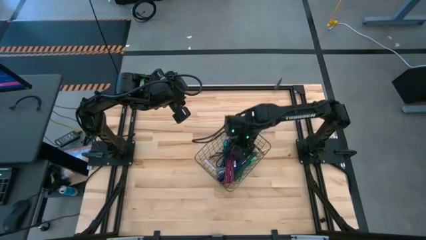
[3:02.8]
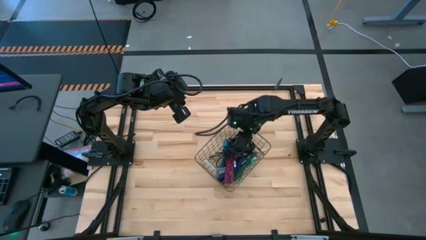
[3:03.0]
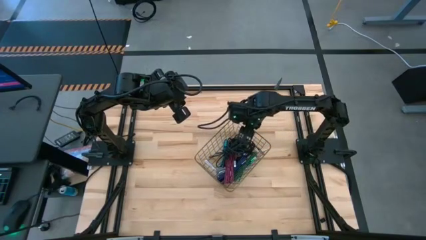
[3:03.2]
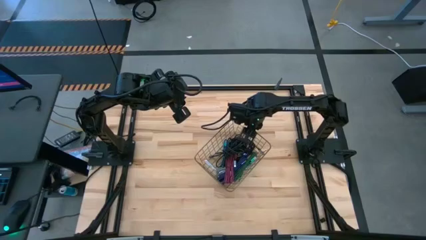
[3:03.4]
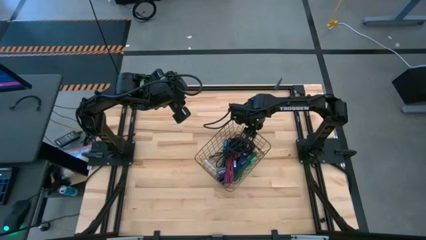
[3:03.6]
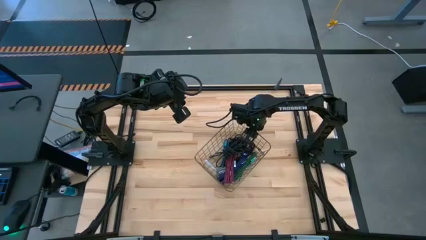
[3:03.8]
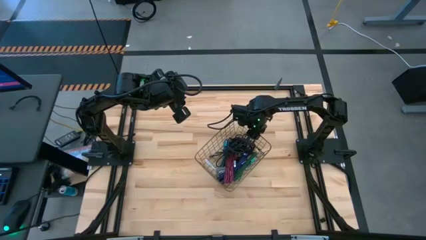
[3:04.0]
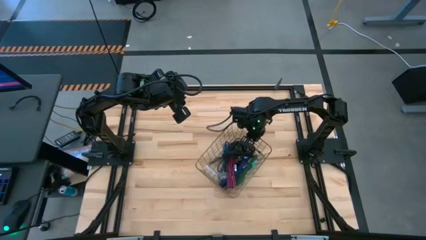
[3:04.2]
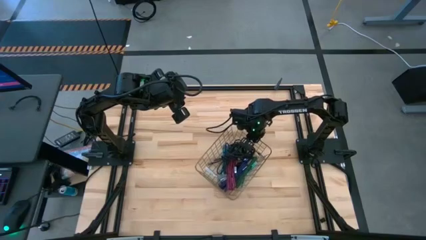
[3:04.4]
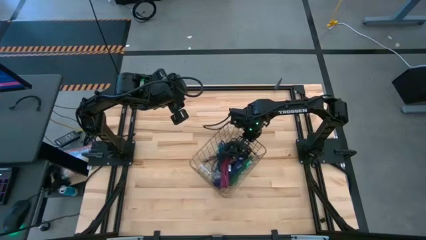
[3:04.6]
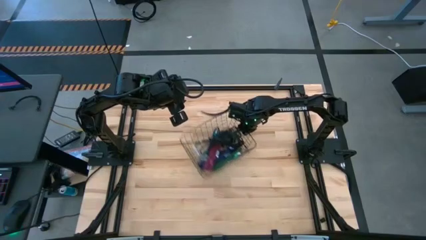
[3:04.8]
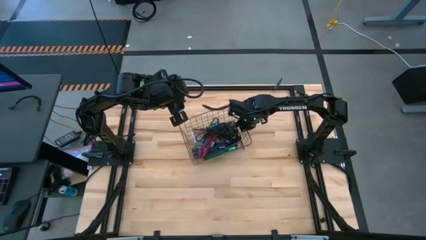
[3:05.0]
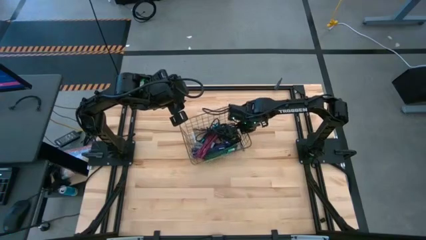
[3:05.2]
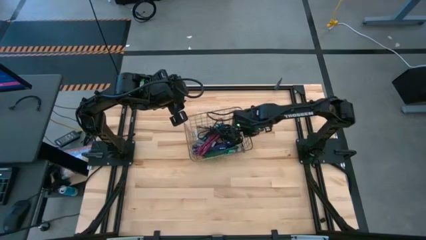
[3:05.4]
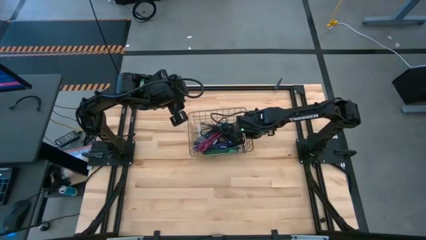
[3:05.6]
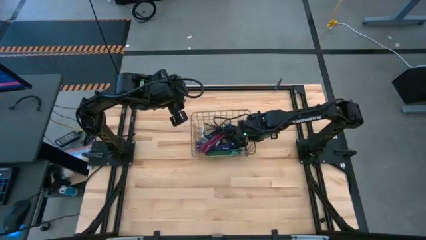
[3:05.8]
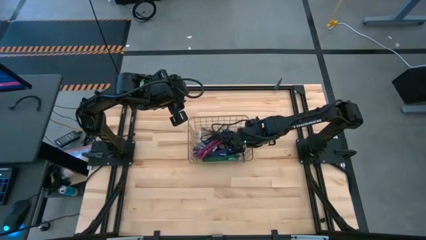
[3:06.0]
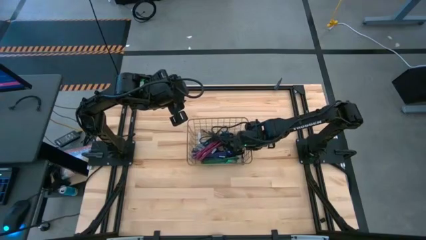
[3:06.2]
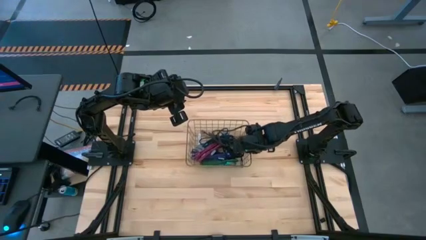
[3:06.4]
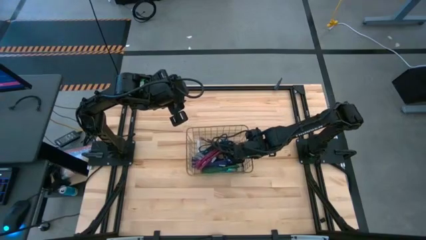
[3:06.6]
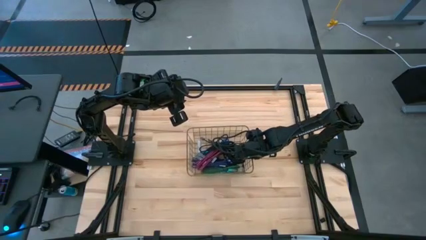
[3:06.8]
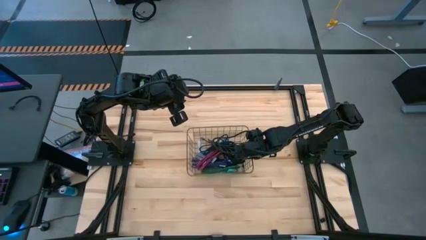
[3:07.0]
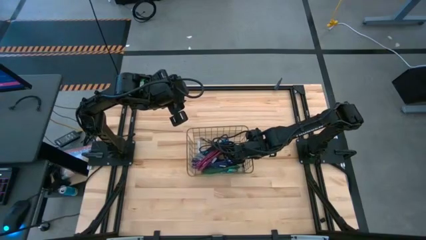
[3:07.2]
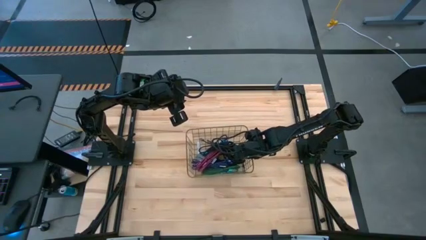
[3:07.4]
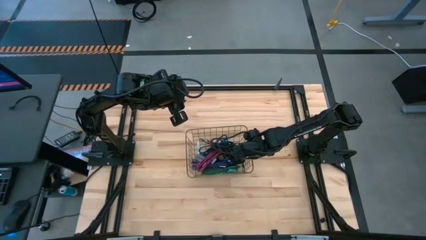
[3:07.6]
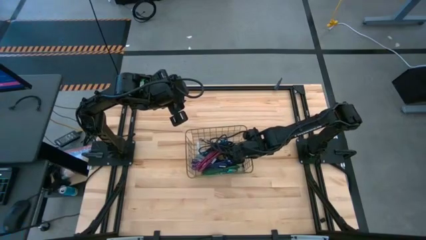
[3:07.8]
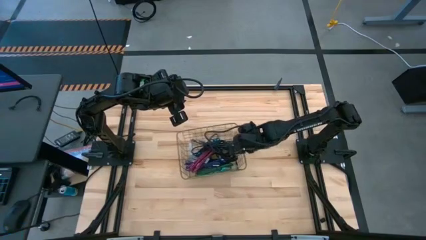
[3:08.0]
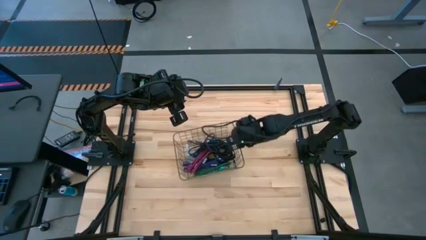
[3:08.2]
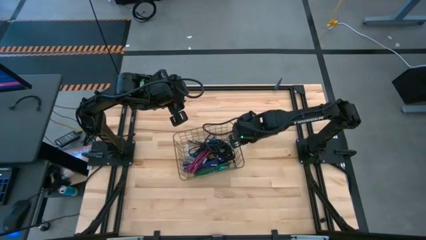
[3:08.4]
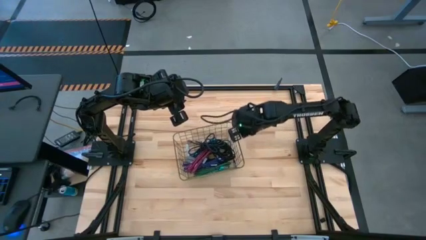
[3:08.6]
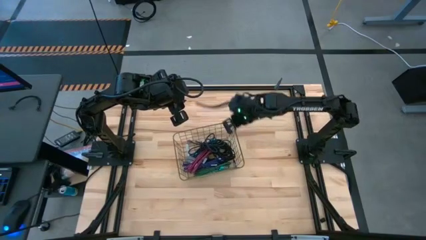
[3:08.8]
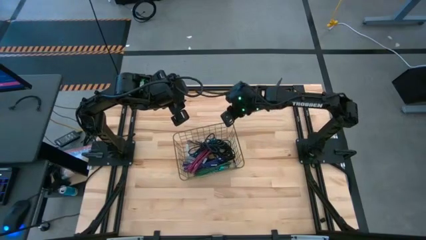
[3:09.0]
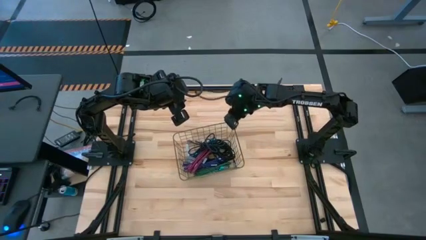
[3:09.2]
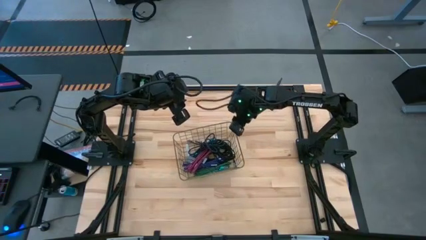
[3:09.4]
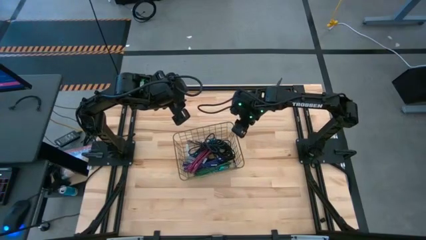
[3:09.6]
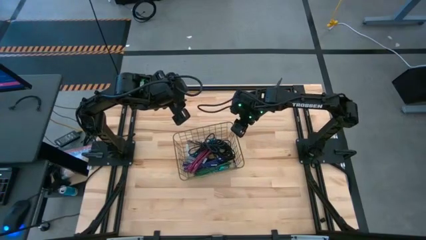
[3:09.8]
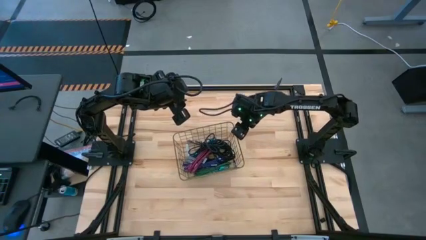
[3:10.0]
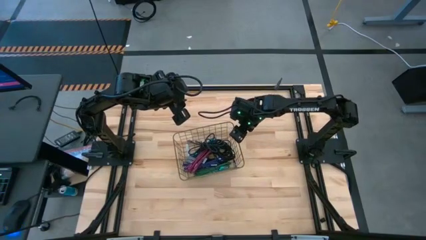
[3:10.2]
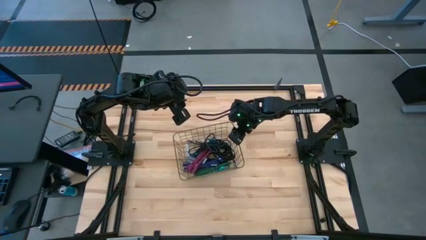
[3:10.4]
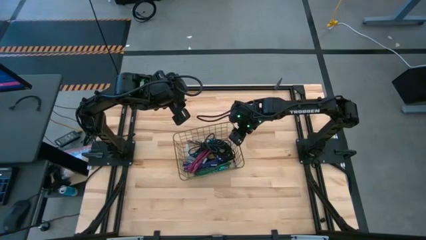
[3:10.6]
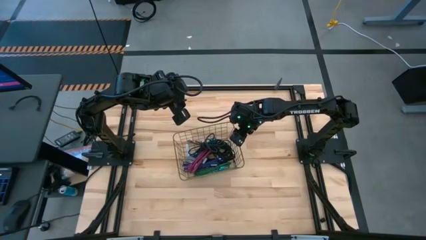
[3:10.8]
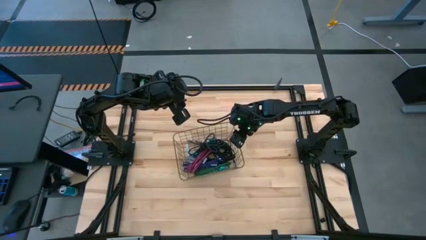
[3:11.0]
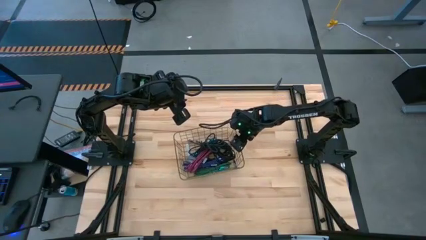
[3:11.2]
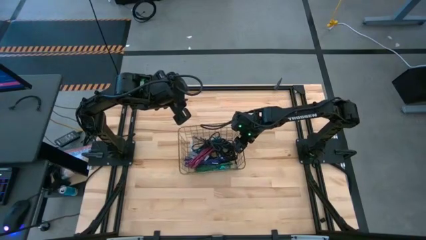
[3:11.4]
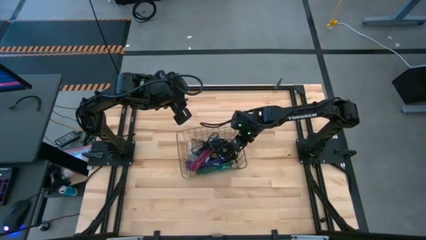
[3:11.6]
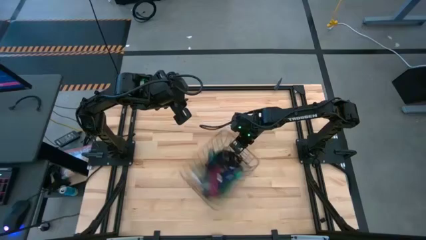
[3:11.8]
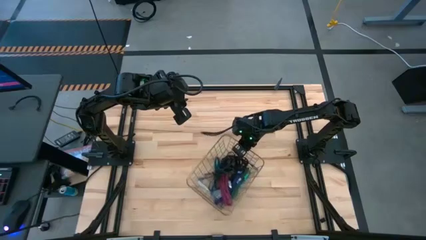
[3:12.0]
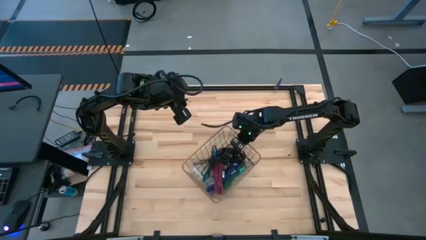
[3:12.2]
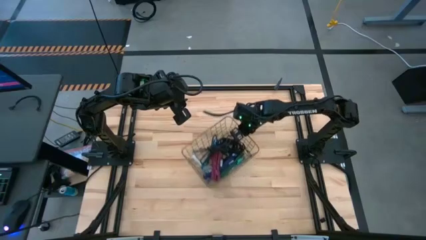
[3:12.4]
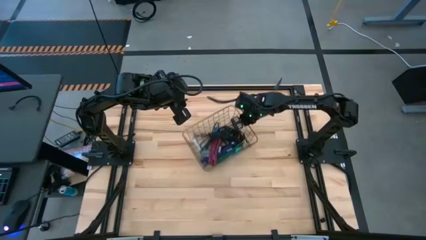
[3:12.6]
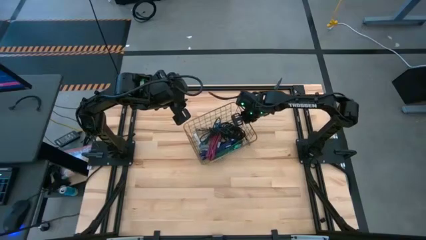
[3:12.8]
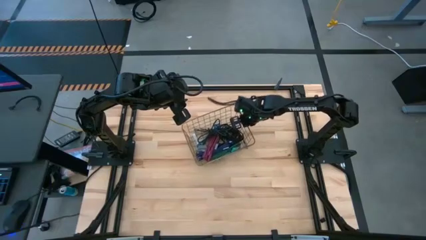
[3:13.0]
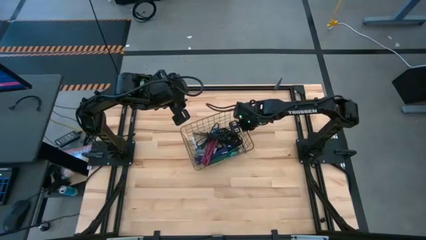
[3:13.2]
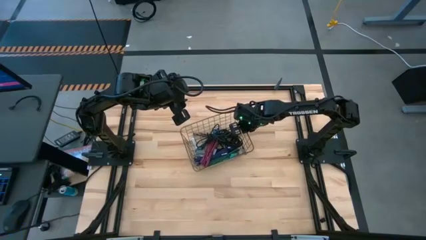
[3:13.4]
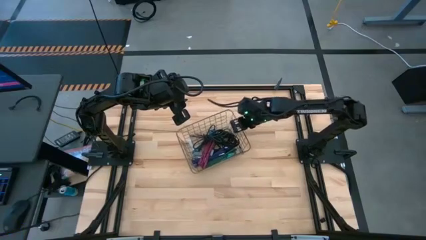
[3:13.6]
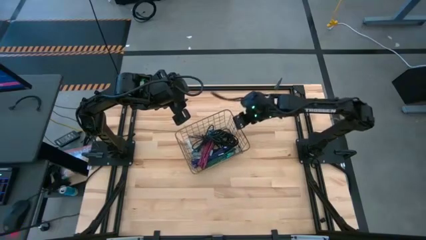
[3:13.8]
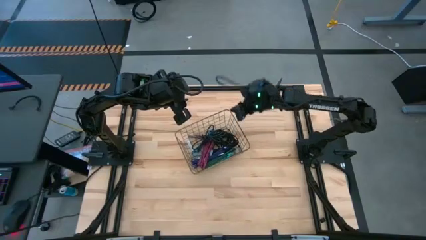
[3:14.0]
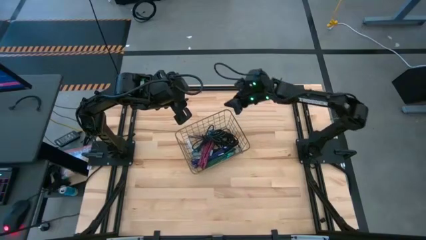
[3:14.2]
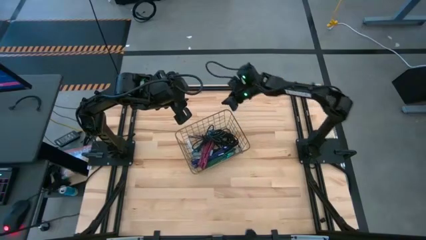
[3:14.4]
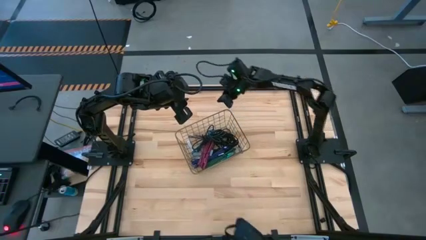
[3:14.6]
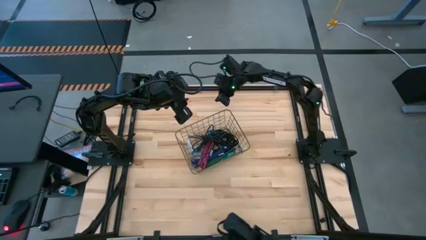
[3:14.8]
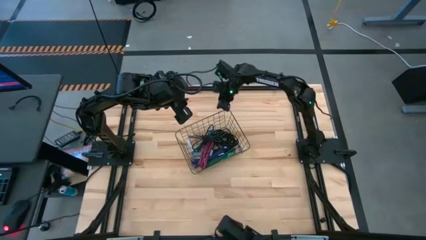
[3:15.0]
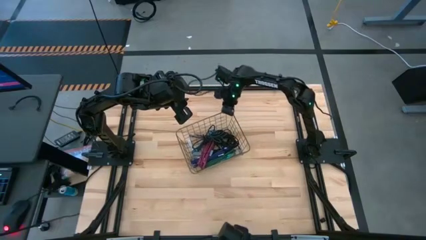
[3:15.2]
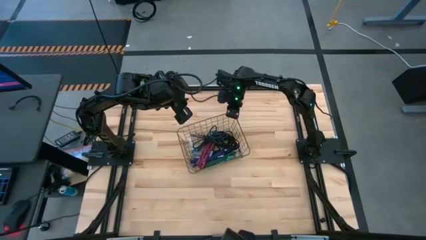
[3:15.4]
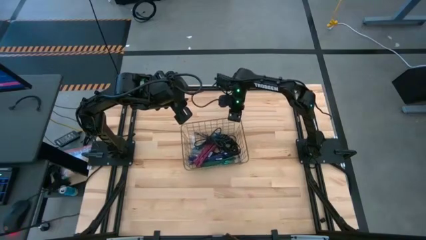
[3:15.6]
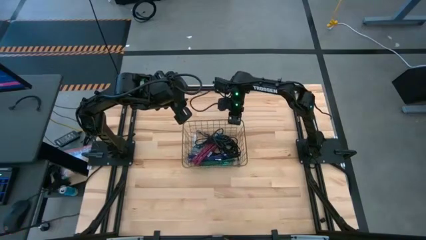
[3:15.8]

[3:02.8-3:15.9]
Task: Pick and place USB-C Cables
Adjust the wire basket

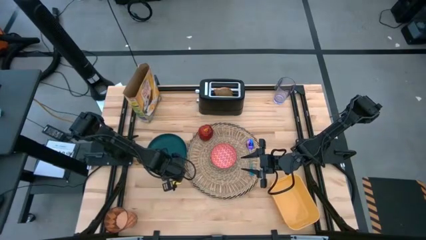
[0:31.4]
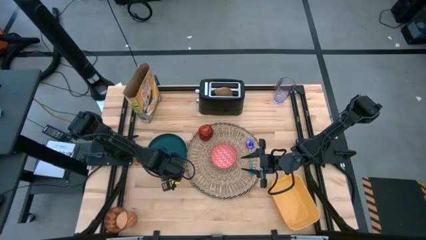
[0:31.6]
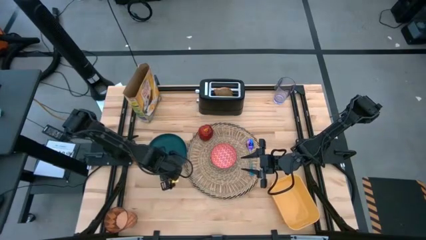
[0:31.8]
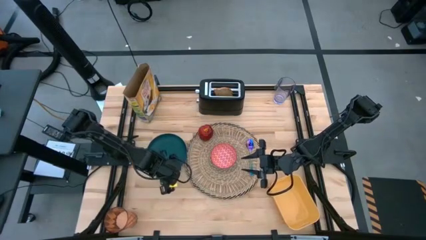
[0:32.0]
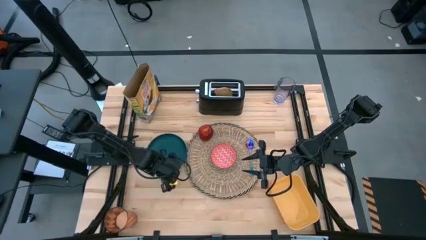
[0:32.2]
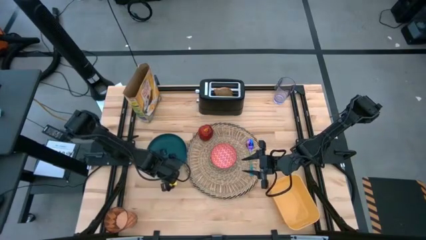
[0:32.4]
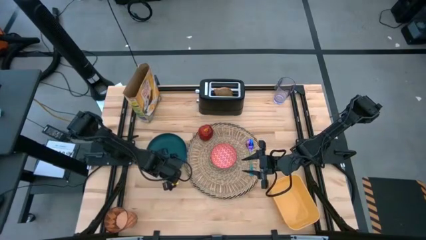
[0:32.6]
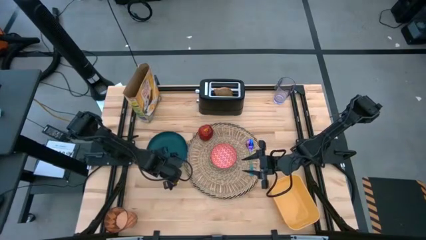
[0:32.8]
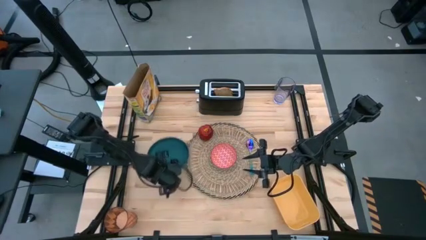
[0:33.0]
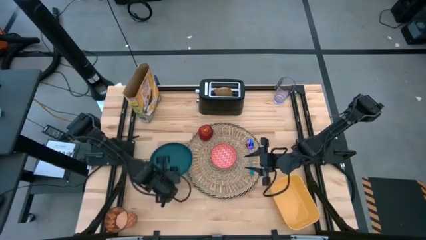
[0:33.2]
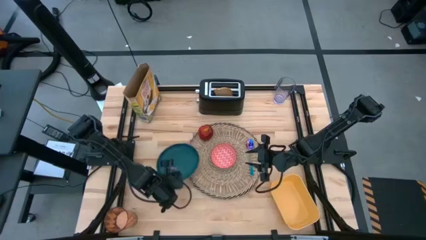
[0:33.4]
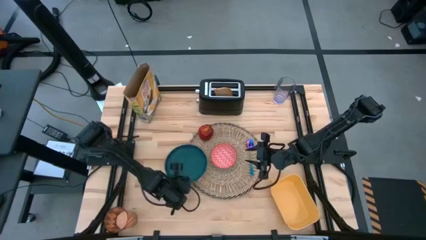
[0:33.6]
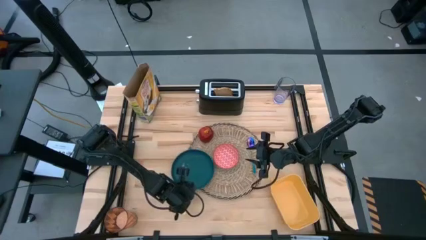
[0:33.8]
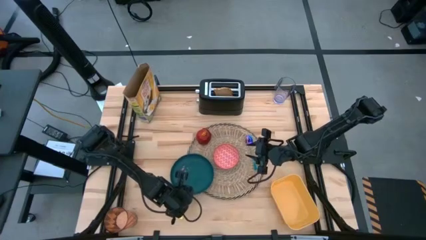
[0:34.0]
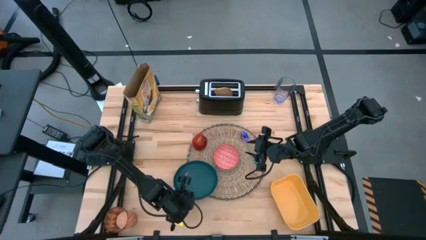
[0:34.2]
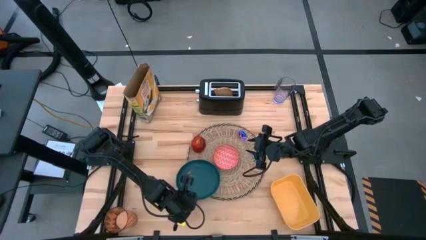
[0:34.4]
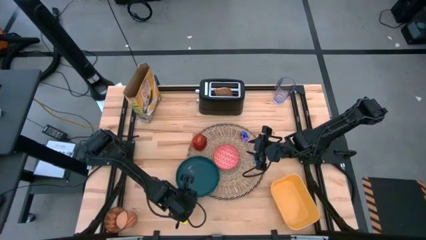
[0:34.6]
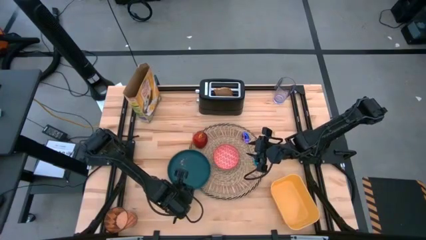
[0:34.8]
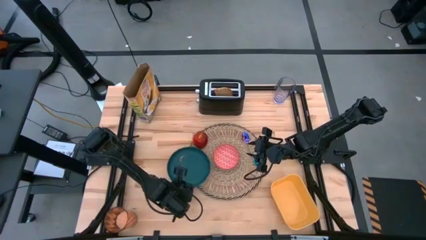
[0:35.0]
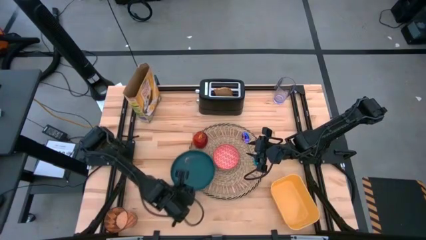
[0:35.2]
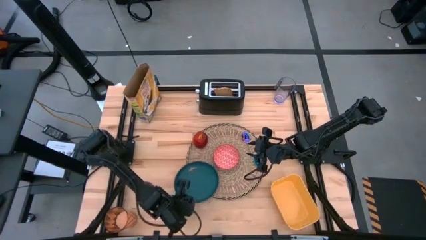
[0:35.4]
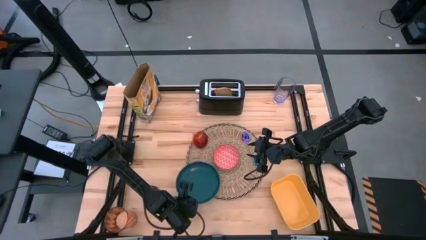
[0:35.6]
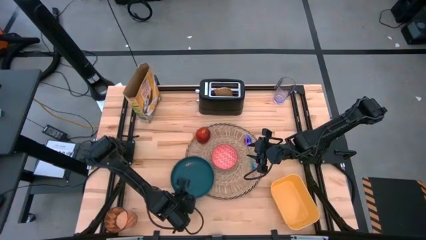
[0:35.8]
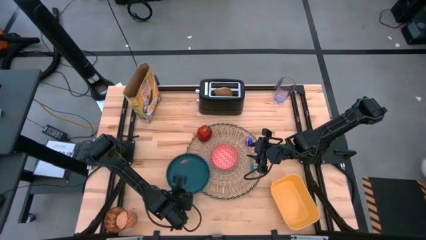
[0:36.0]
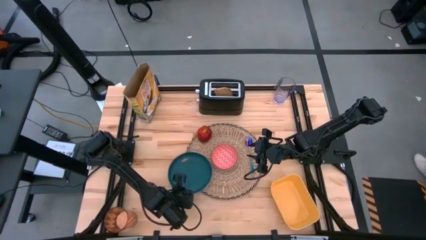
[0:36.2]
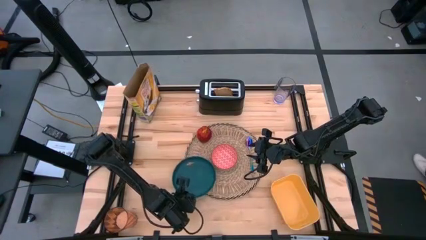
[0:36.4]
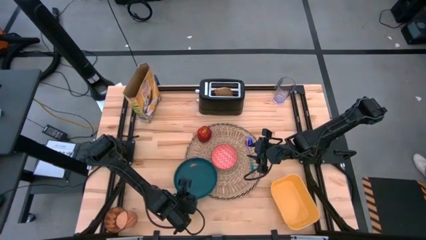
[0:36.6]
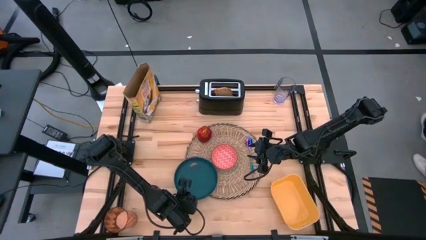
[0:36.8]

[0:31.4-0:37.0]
Task: Arrange a breakfast setting
Put the blue plate on the brown table mat
